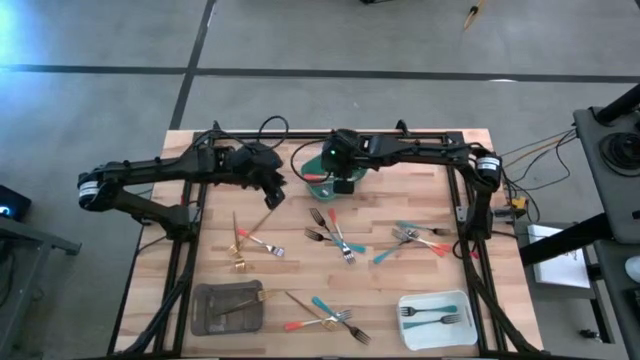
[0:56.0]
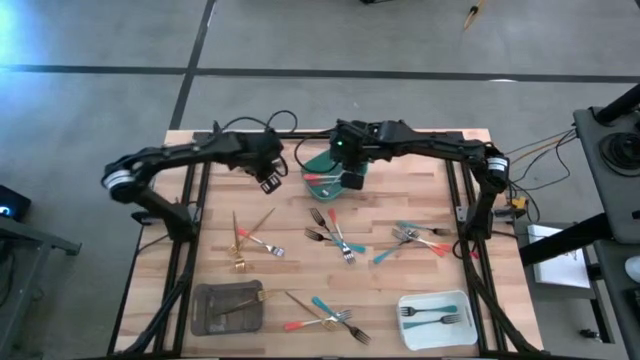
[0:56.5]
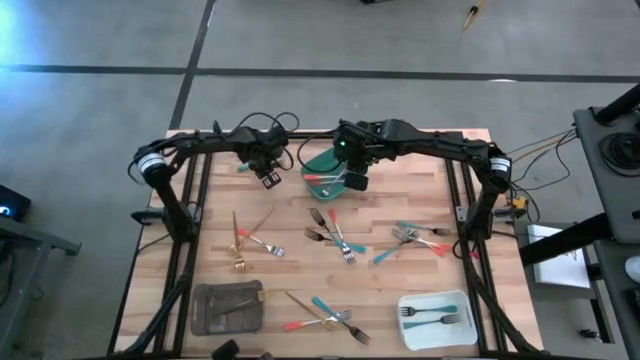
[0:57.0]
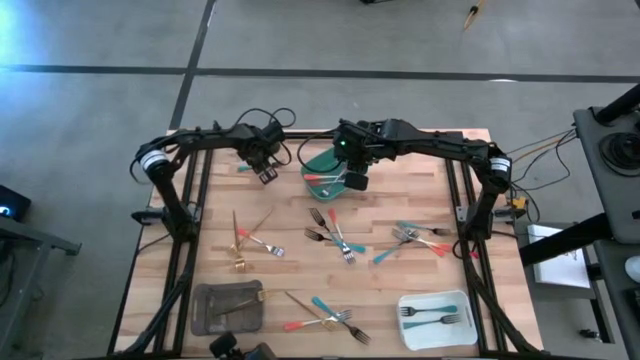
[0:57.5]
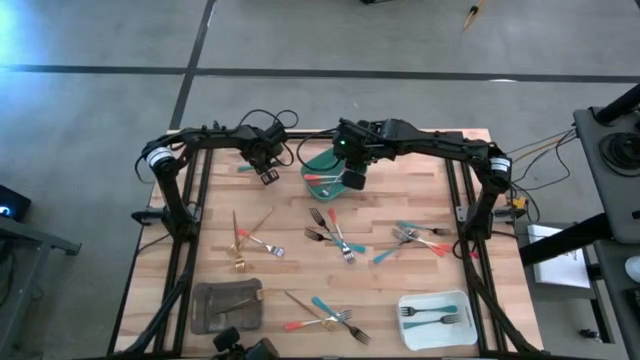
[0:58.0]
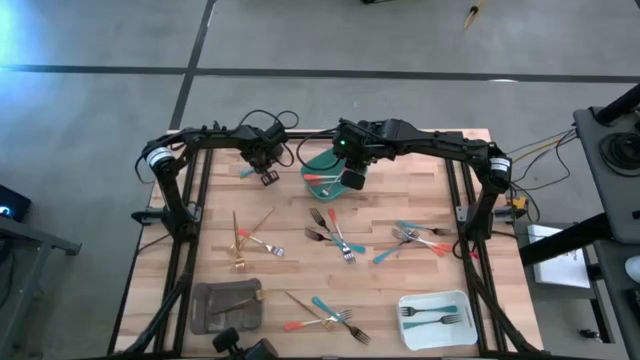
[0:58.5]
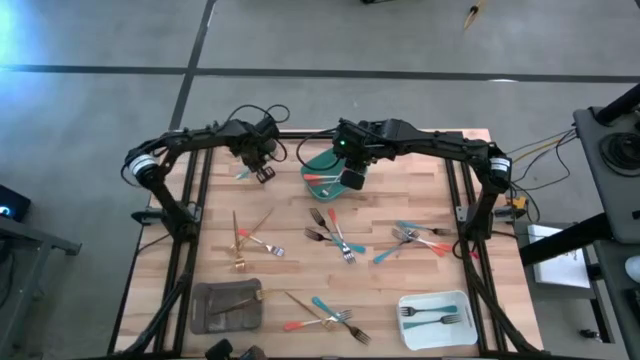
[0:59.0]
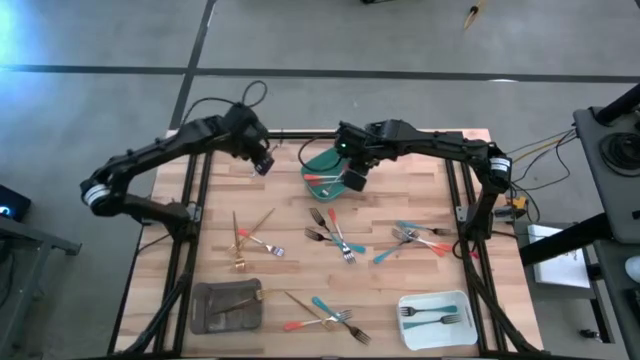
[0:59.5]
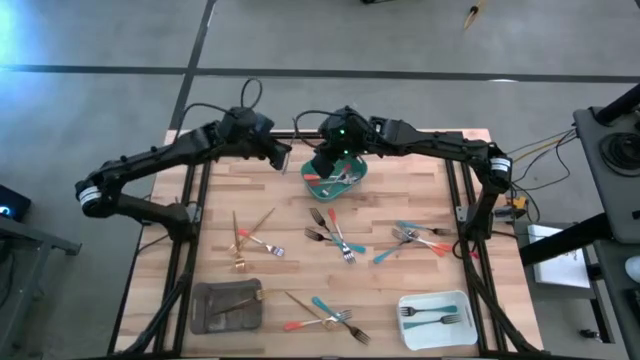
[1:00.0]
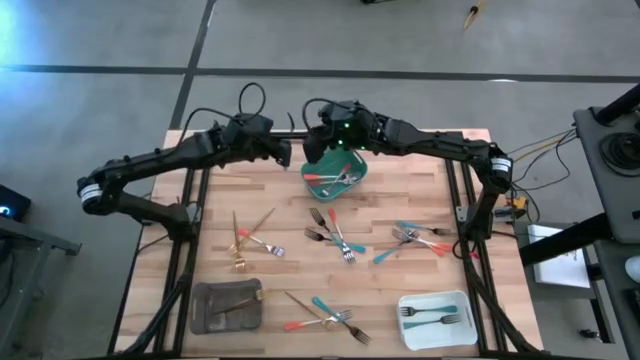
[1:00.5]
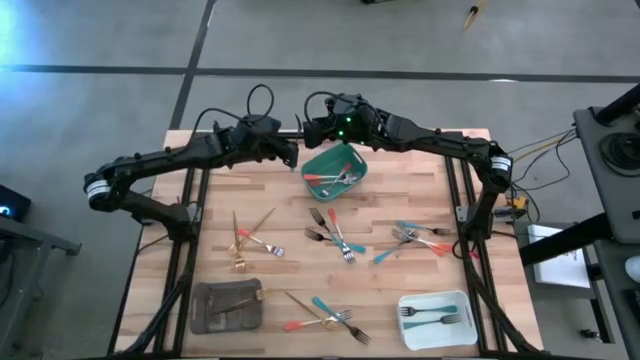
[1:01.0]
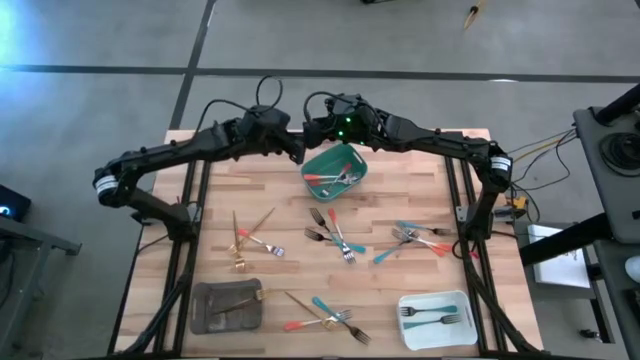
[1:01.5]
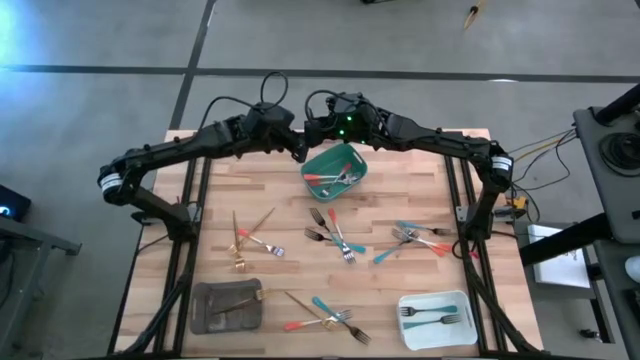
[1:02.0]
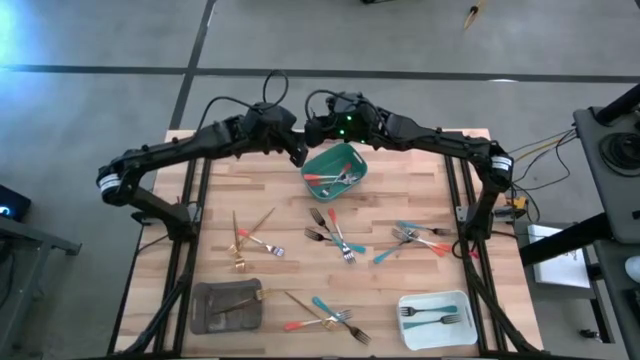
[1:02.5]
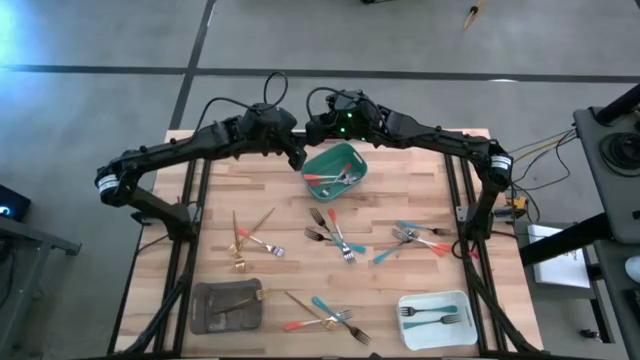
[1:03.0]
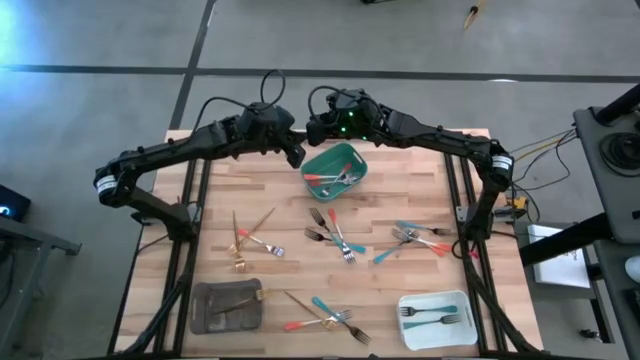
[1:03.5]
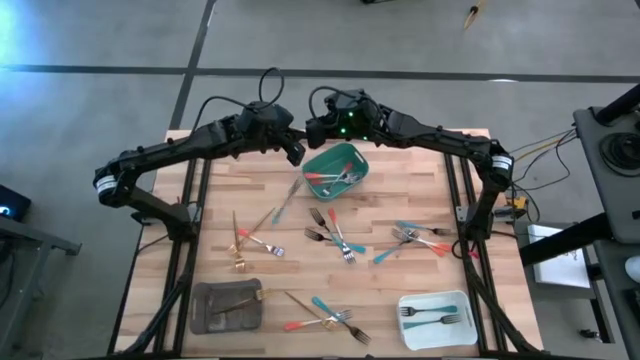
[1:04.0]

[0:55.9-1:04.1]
Task: Sort silverware by color (type)
Put the blue fork into the white bin

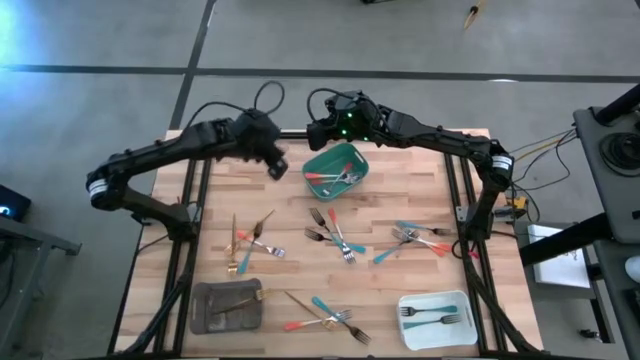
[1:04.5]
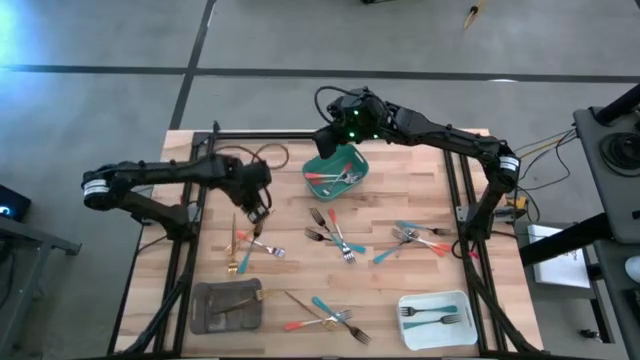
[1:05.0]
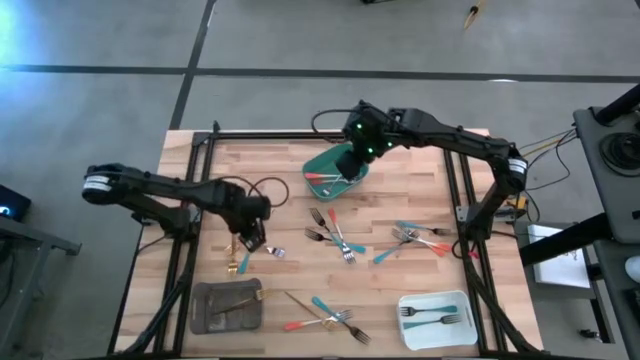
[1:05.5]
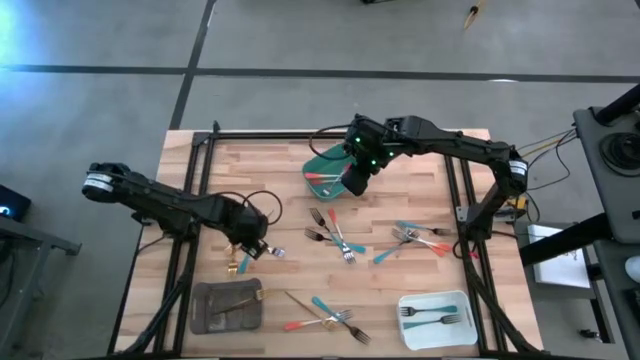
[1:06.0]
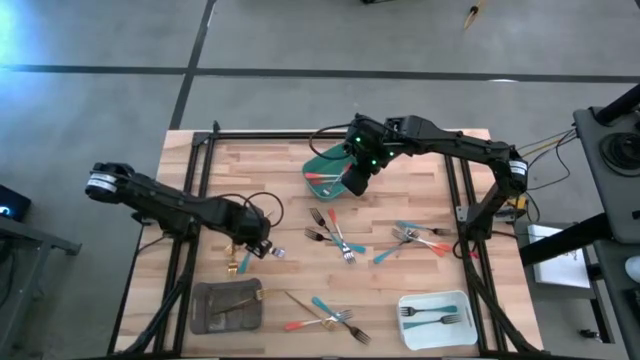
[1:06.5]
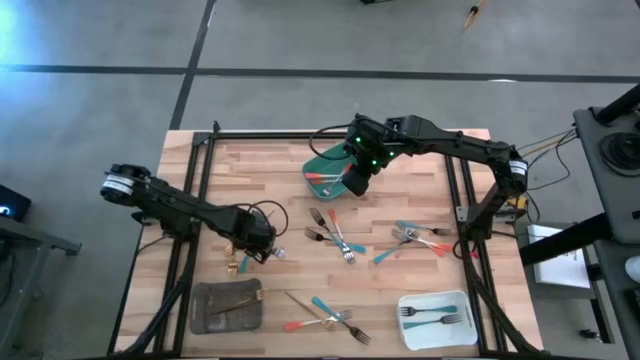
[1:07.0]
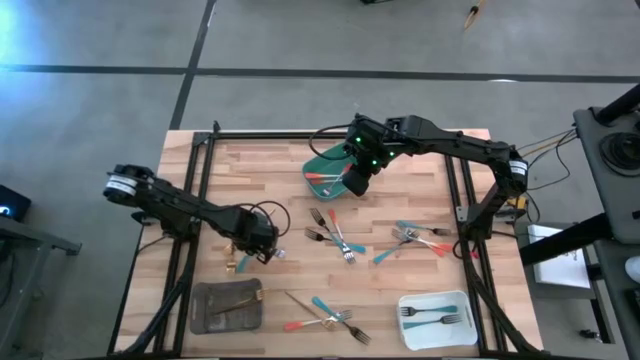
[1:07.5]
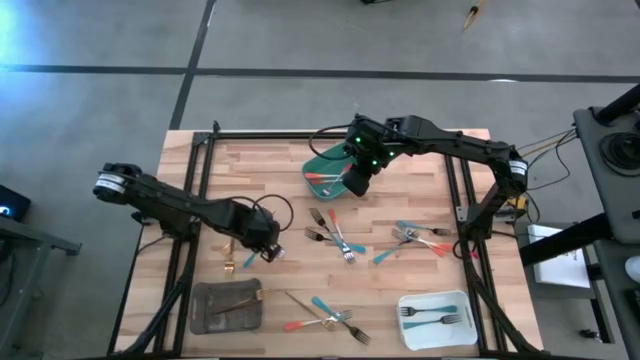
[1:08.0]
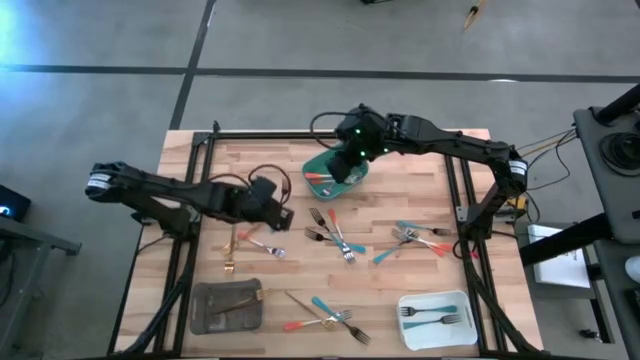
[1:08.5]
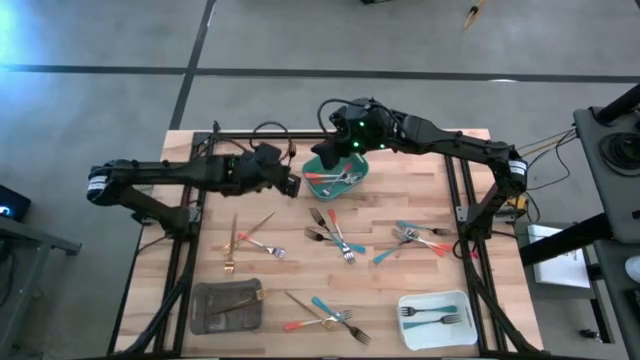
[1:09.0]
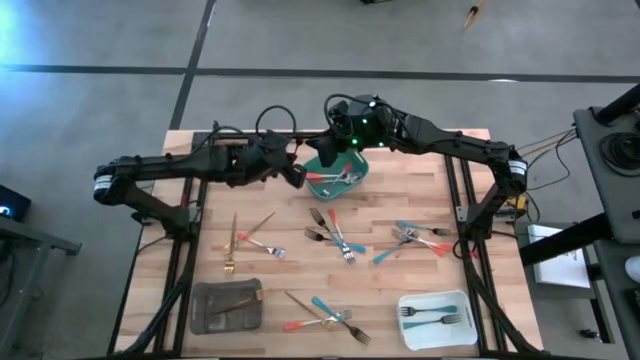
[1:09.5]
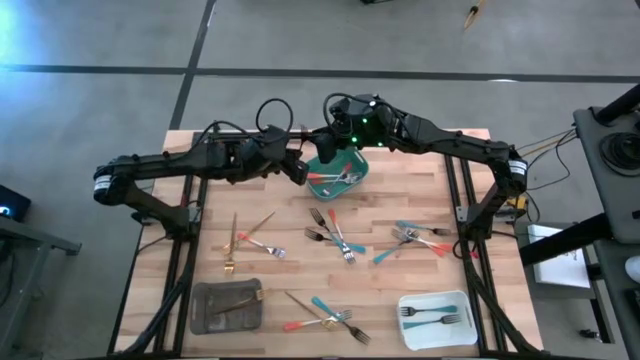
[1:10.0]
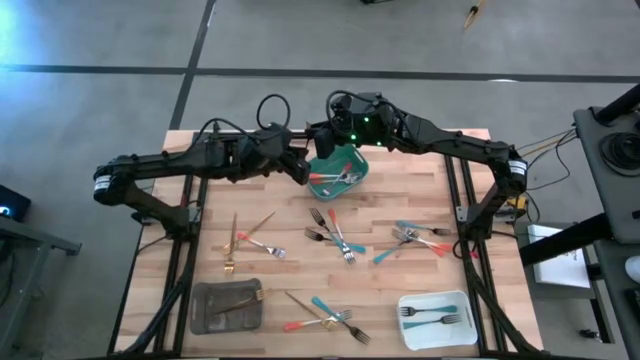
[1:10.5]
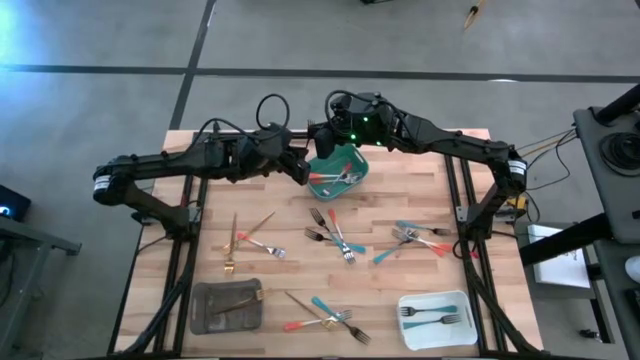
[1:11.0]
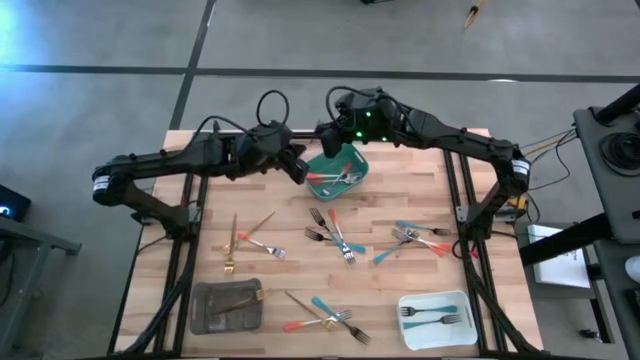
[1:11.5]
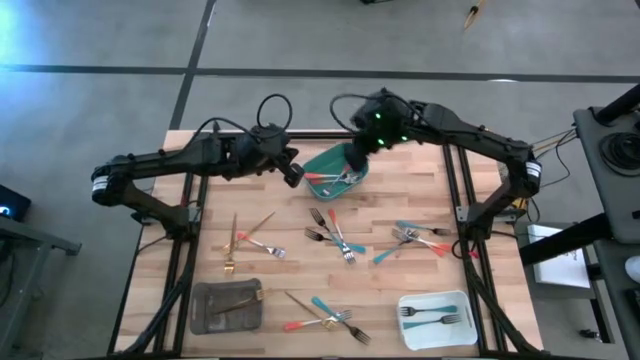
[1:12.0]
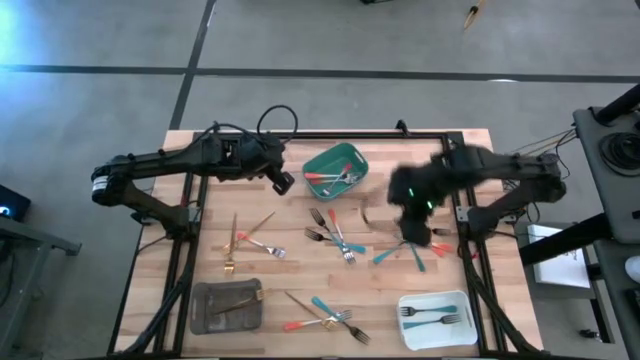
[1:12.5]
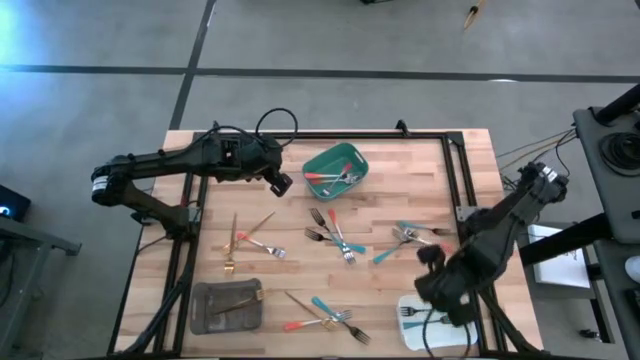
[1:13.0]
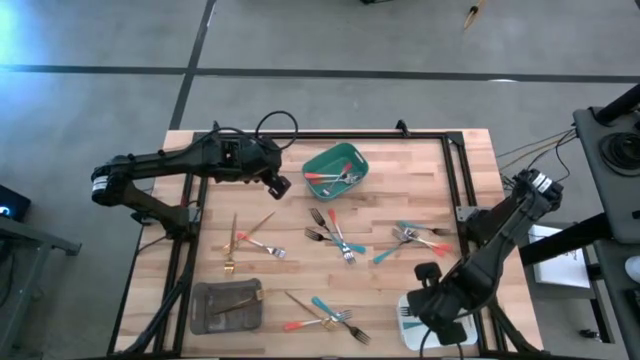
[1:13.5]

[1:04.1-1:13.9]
Put the blue fork into the white bin

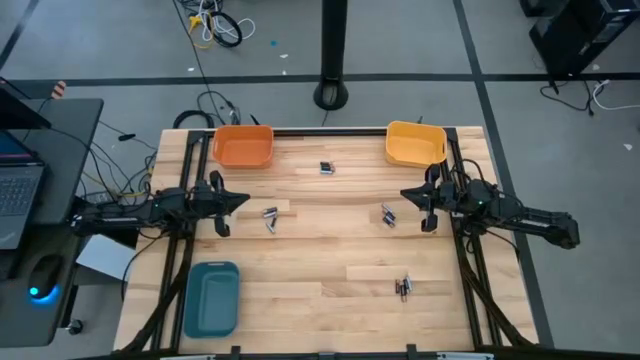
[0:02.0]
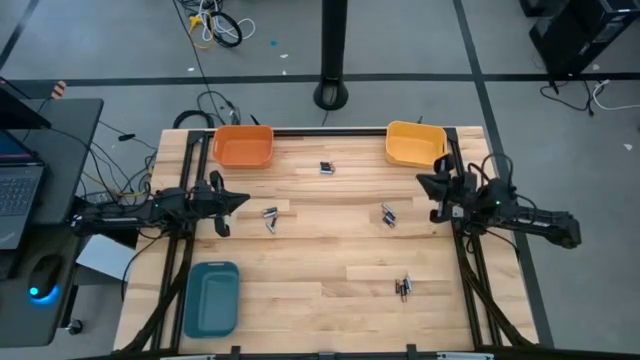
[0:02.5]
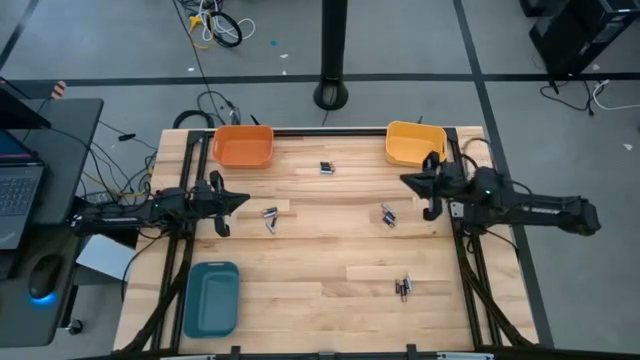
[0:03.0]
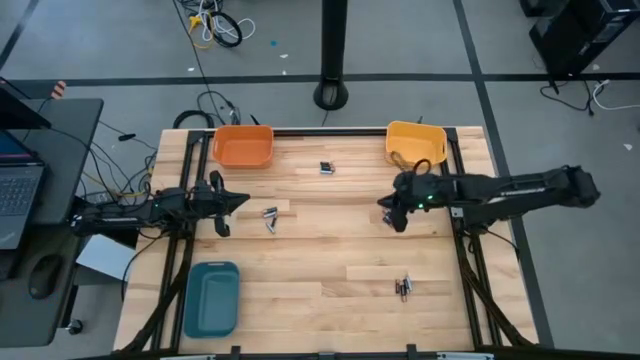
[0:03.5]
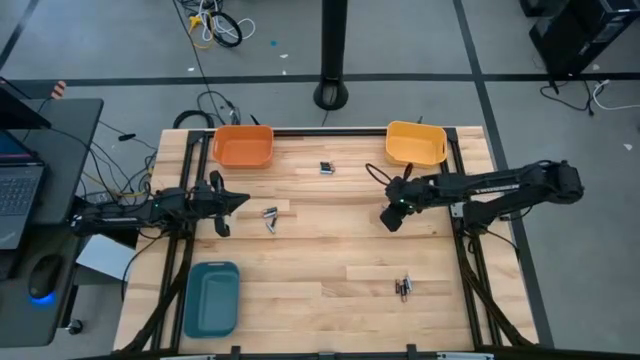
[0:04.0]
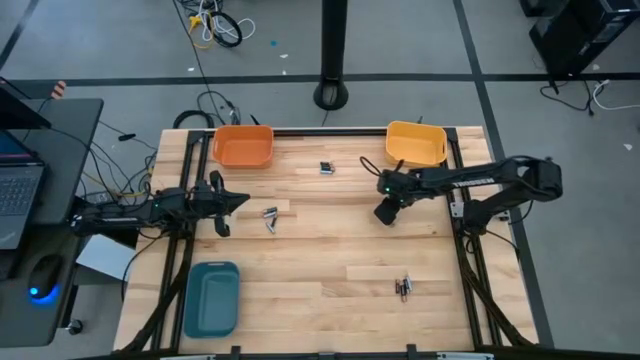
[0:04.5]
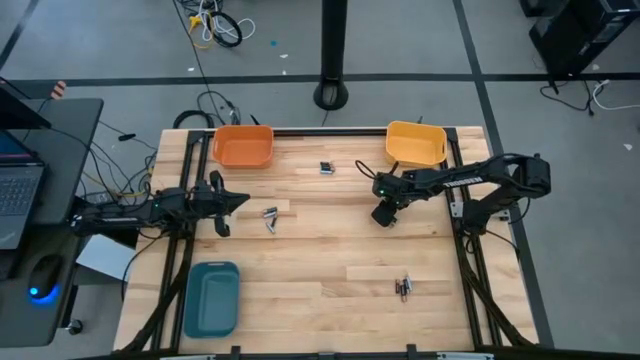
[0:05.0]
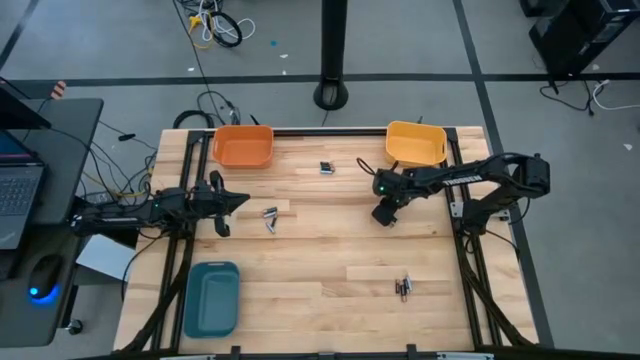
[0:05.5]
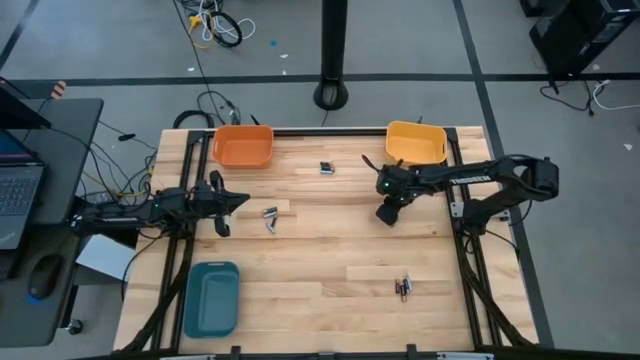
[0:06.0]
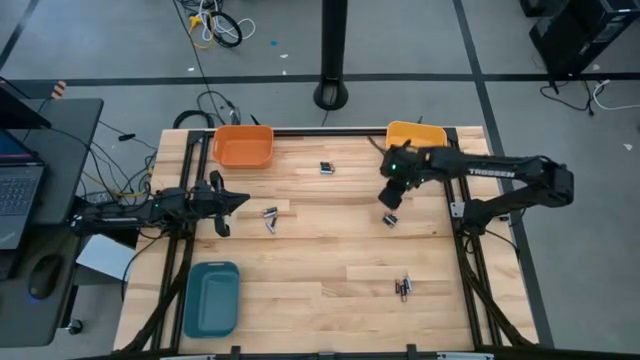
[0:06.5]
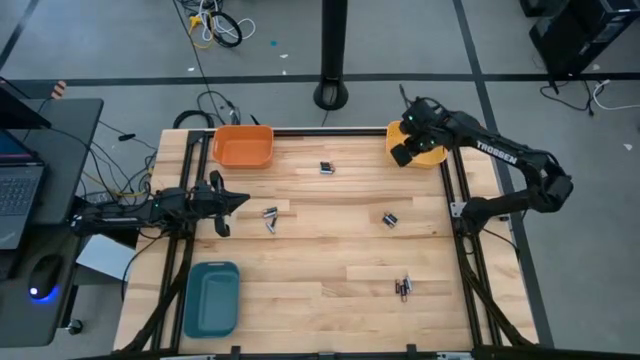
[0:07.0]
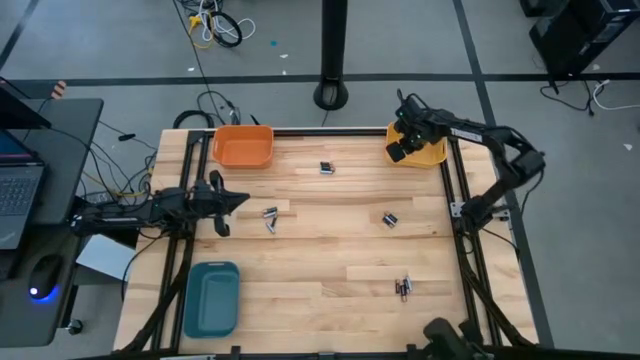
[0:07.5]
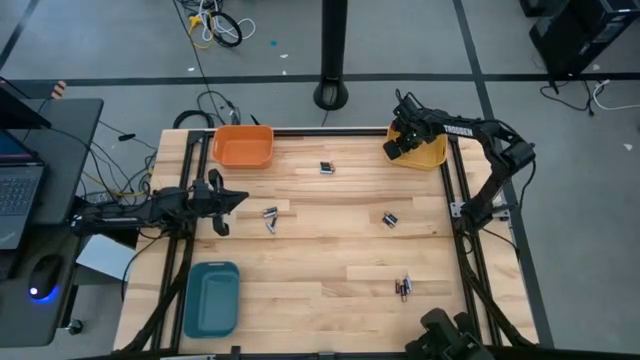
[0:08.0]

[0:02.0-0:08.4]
Task: Sort batteries
Put the small gray battery into the yellow bin
